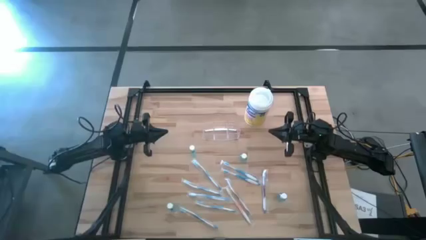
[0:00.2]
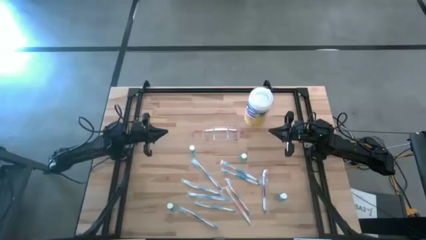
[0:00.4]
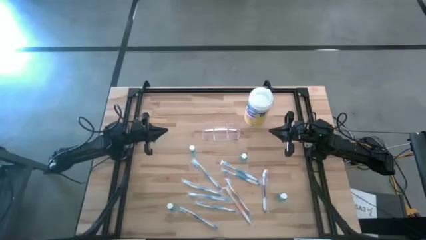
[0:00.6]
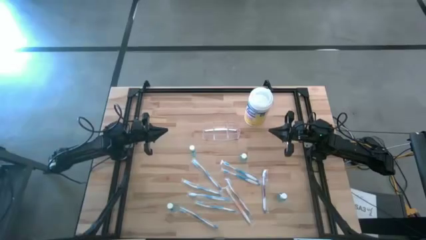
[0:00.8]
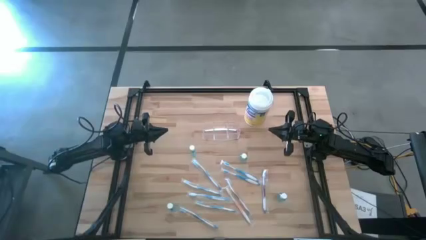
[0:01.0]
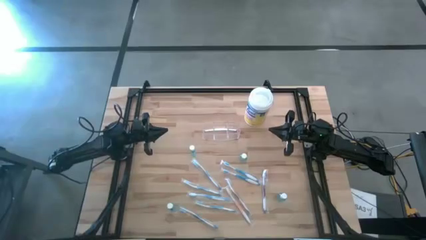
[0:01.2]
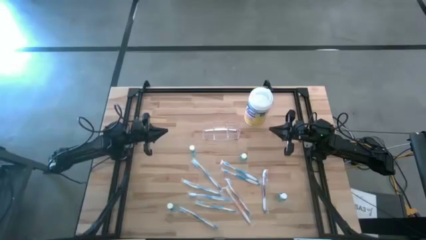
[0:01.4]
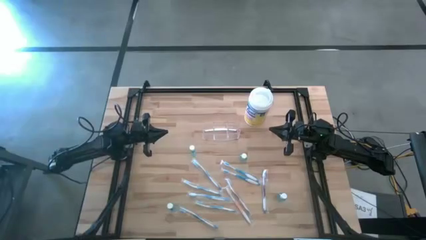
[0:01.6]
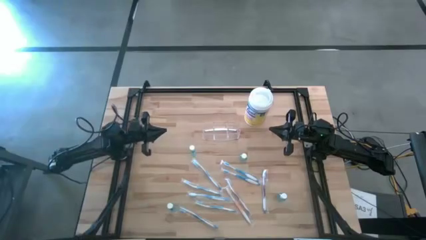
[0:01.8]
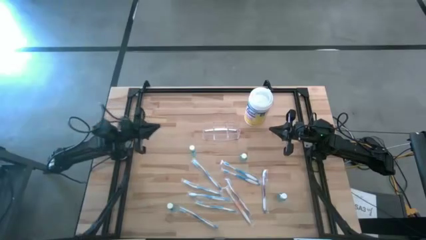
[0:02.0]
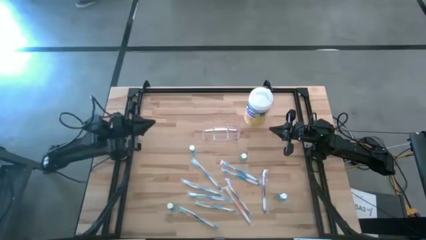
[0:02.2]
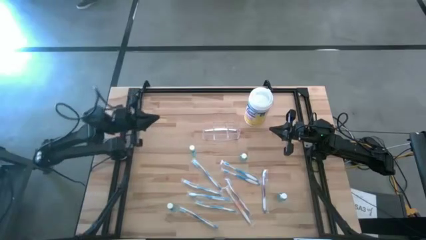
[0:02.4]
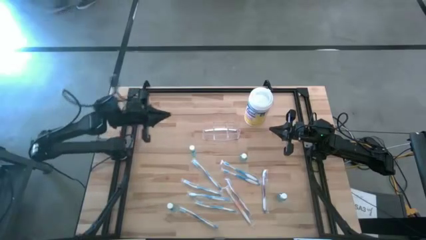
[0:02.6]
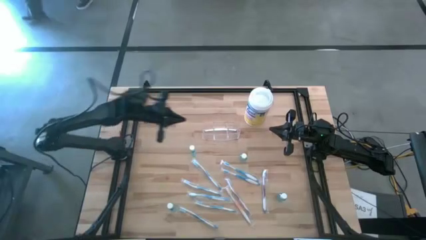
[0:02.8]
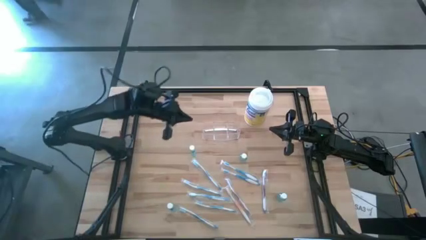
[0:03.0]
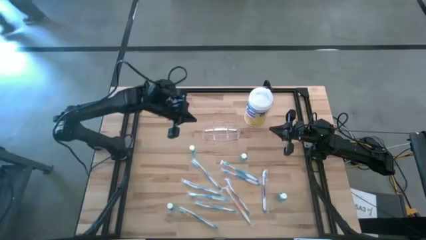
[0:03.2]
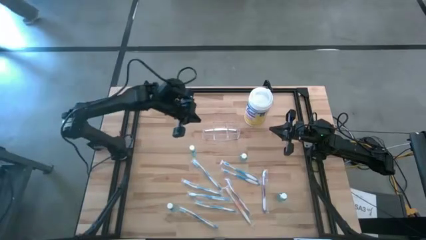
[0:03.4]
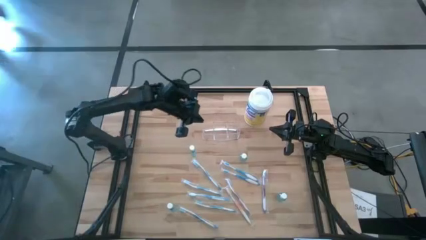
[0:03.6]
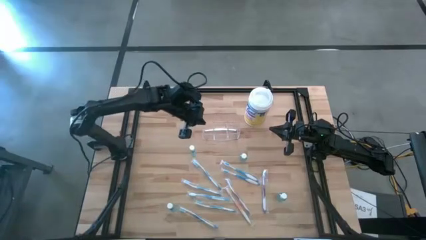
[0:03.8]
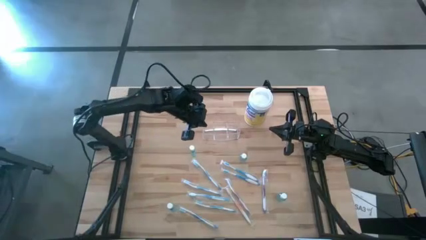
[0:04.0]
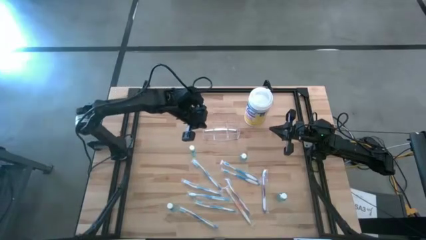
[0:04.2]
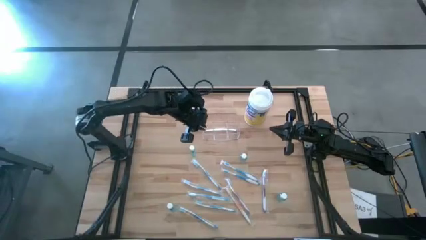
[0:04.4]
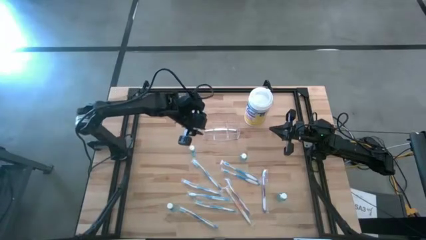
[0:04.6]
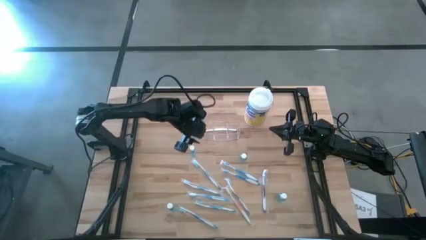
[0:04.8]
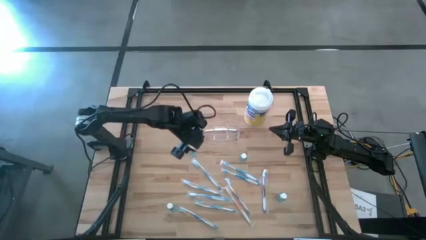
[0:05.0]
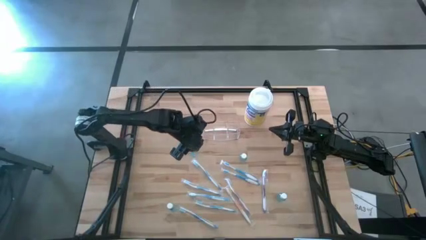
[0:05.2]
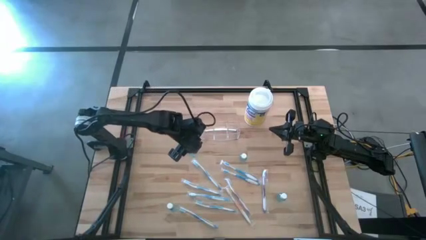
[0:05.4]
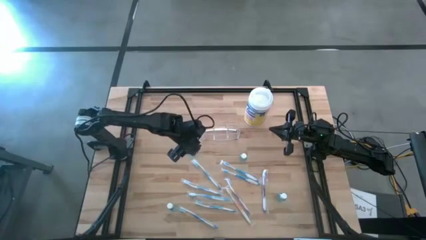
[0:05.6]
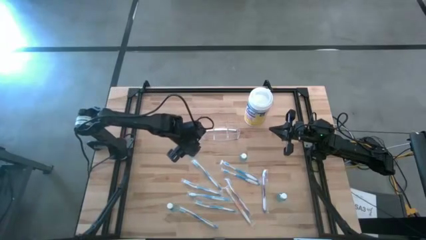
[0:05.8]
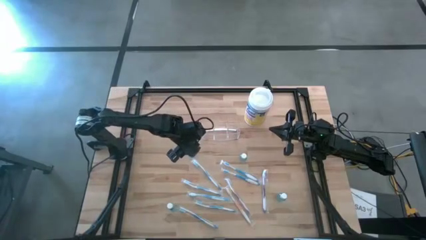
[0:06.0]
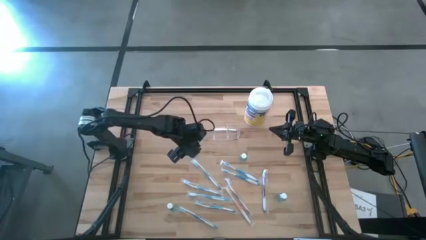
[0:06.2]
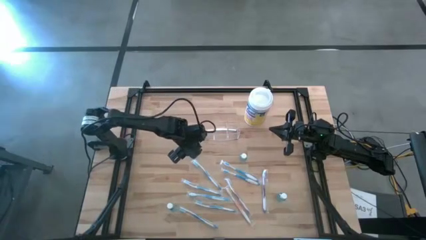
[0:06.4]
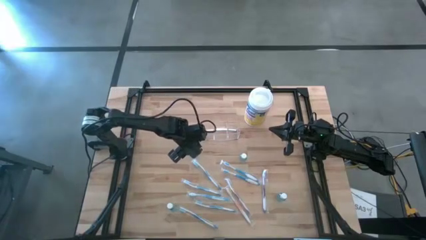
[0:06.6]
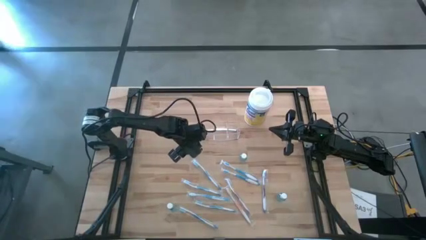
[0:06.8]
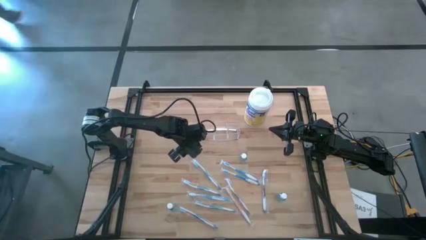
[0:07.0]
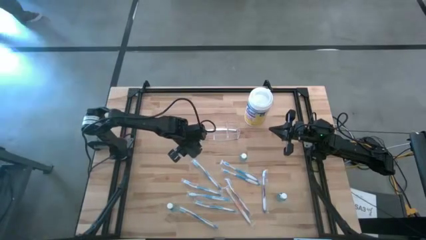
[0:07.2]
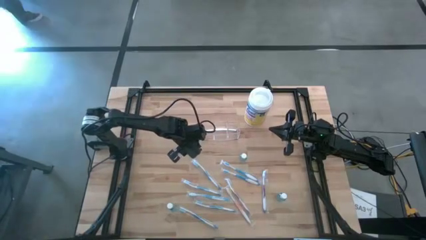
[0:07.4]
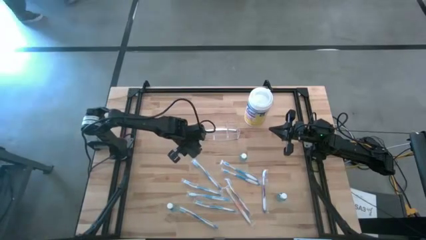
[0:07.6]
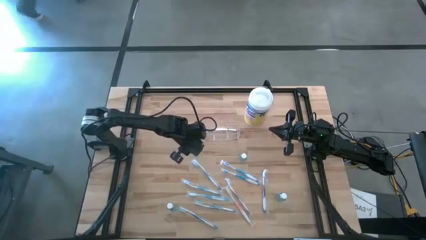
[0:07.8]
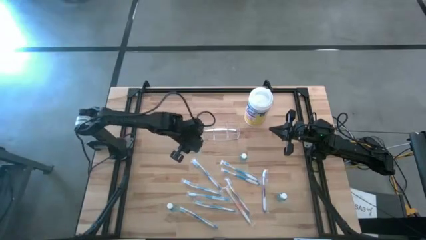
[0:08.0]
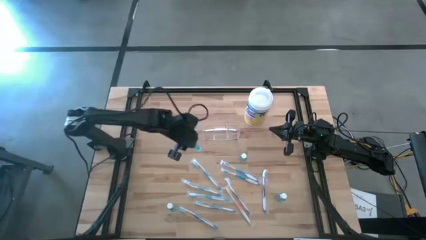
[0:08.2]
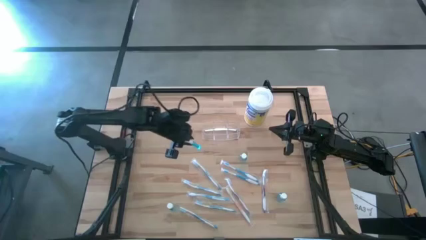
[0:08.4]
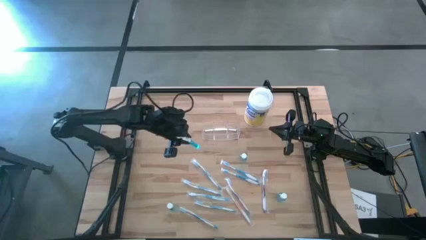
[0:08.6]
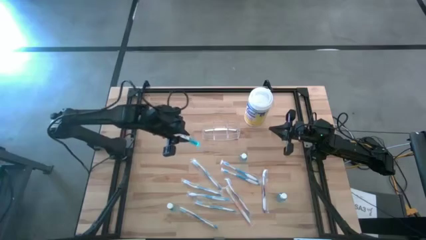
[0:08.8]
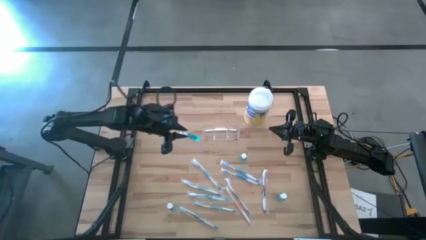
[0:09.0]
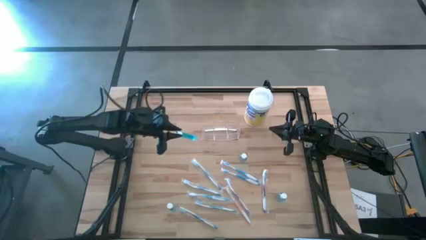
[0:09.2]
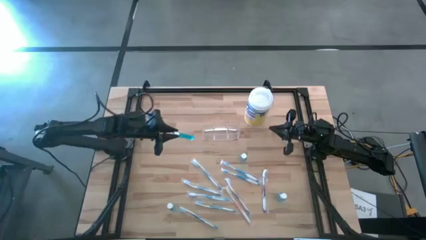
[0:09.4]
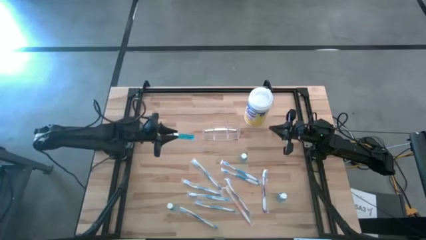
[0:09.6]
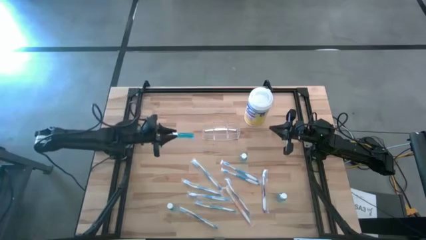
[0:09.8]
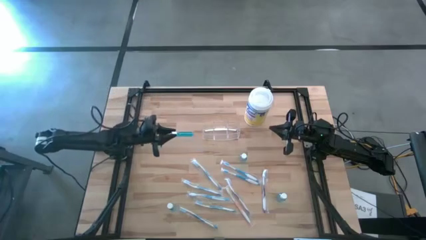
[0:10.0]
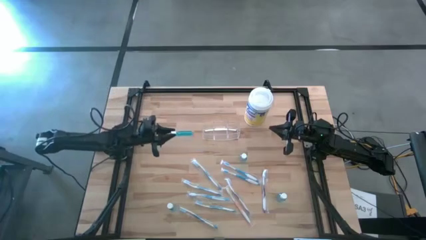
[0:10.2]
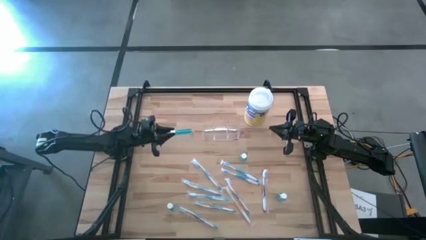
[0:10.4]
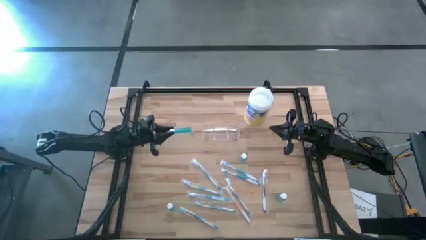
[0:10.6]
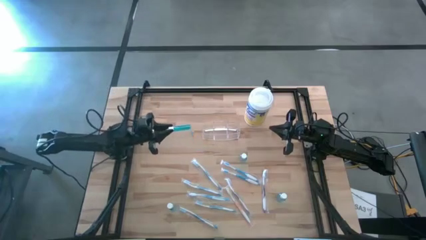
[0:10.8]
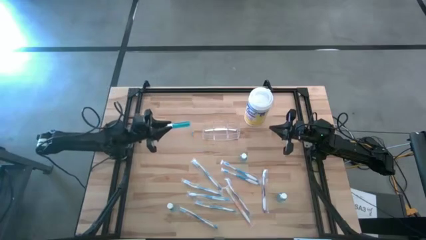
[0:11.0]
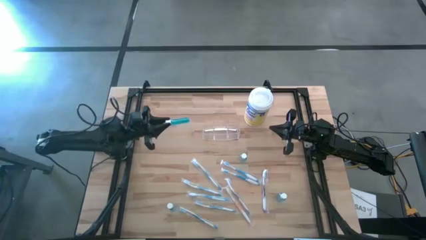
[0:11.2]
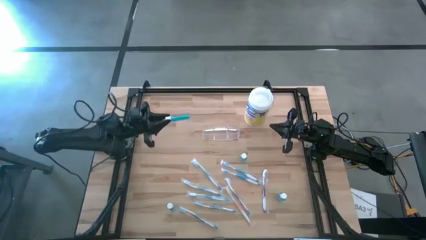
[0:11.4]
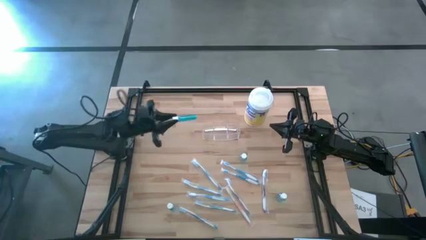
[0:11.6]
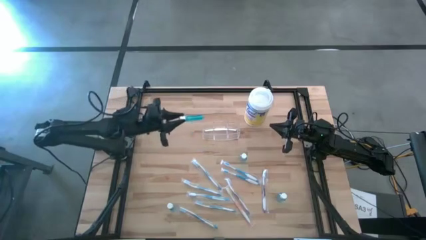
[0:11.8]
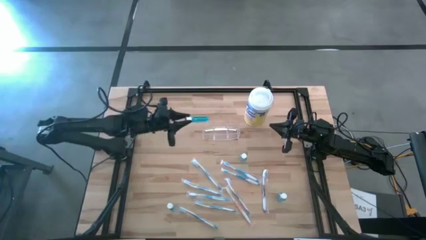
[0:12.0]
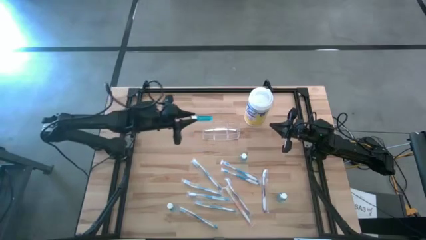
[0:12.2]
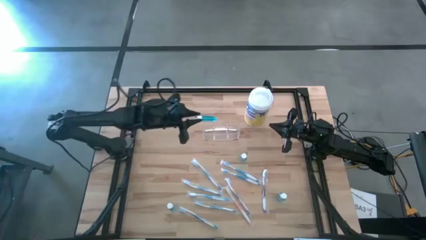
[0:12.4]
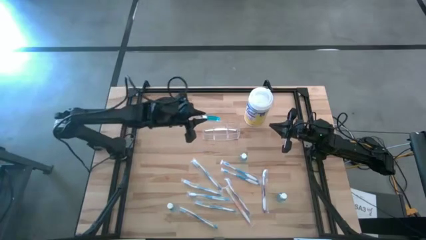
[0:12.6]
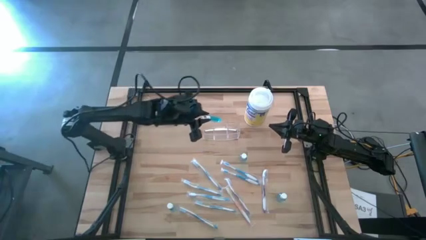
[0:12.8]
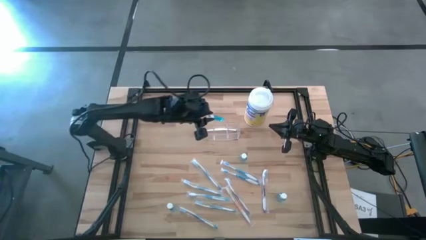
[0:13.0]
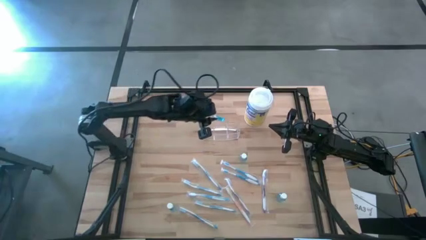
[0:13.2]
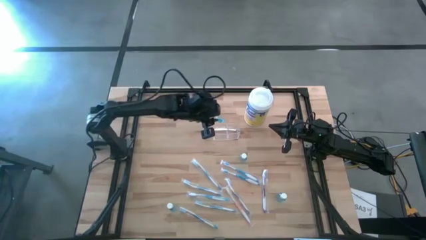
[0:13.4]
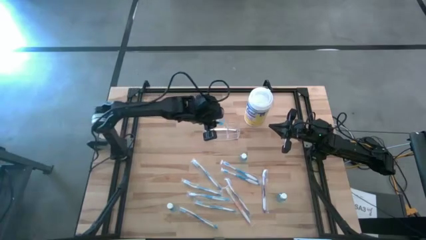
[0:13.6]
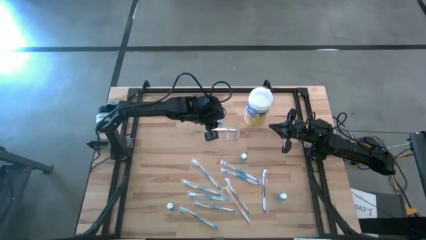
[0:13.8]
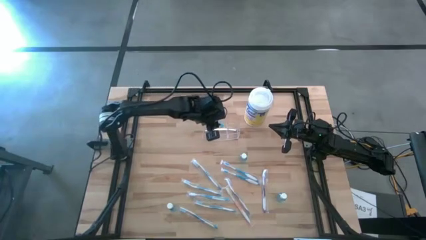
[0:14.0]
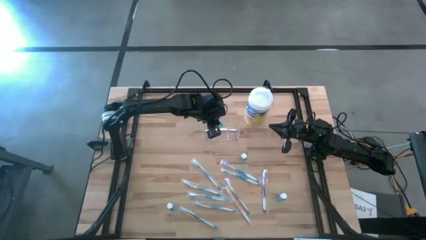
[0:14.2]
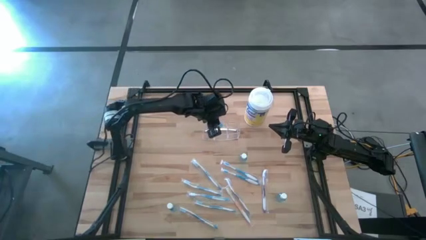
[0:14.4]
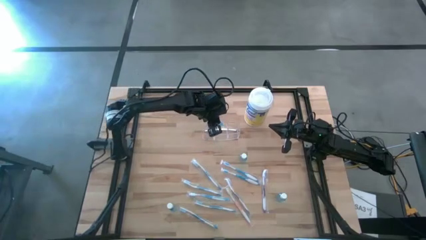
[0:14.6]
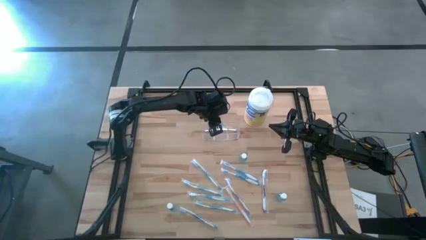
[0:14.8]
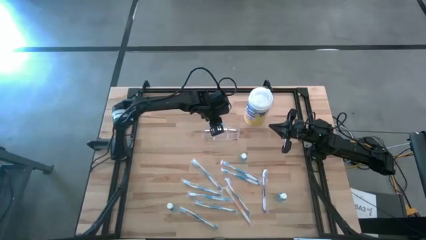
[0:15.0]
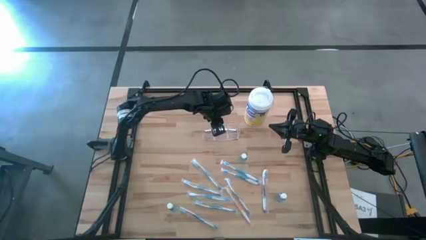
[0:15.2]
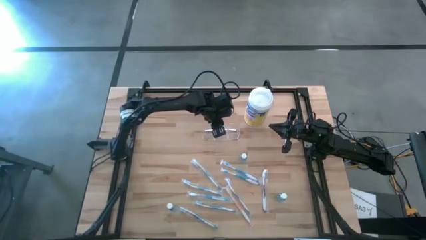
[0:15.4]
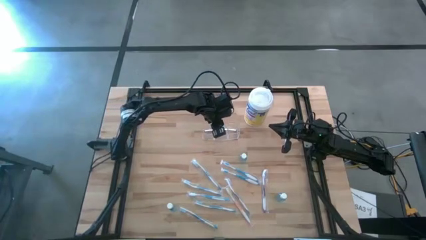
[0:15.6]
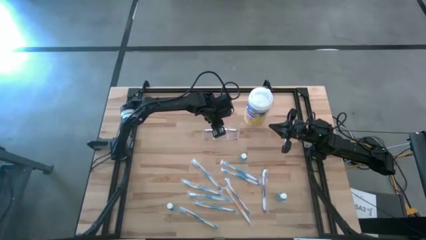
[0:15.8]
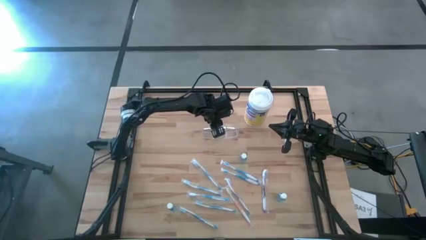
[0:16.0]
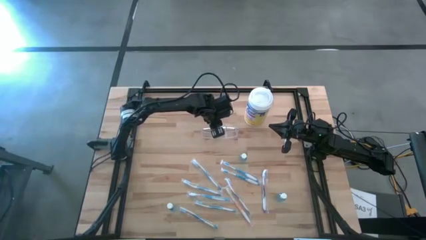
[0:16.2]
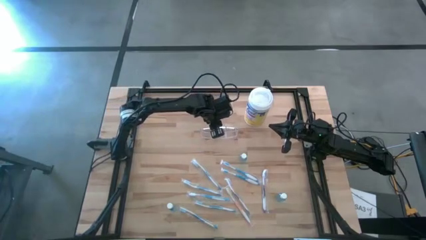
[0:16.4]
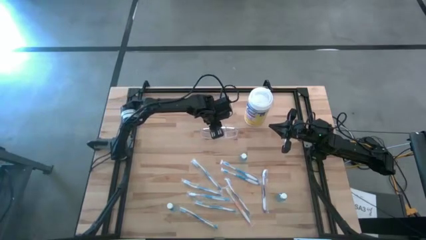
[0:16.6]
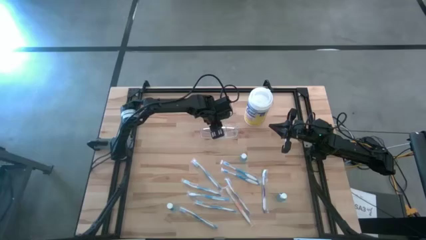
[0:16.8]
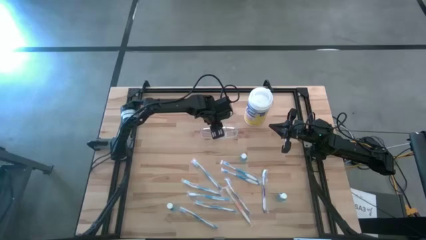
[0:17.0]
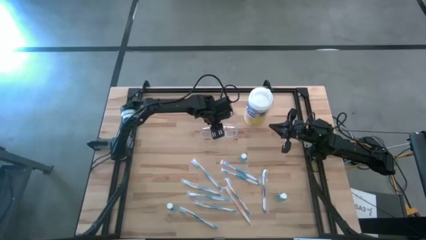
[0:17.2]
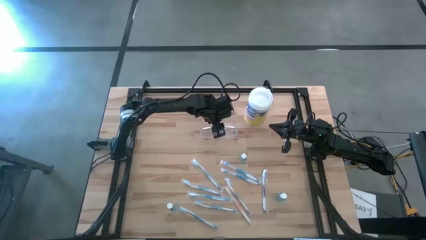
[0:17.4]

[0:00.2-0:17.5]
Task: Pick & Place toothbrushing station
Put the blue mouthwash into the transparent organizer
